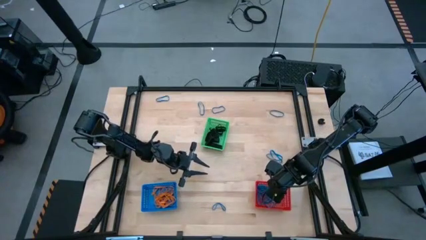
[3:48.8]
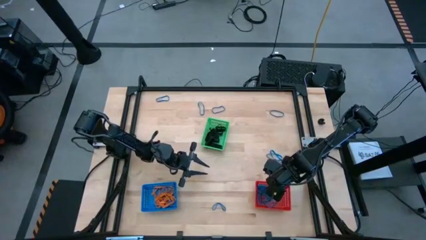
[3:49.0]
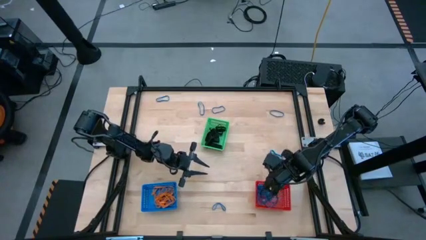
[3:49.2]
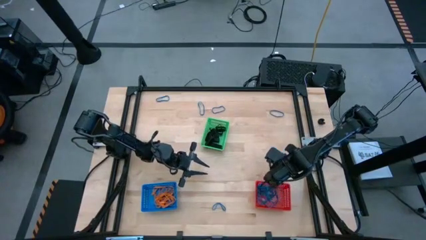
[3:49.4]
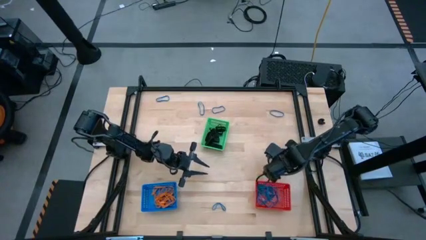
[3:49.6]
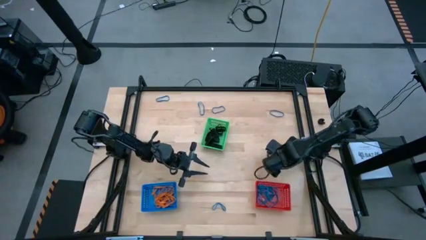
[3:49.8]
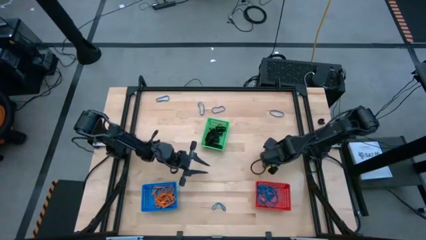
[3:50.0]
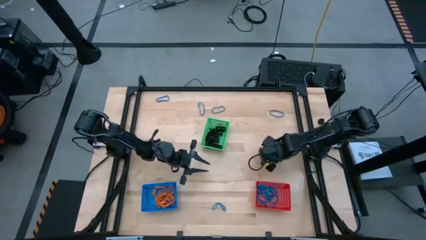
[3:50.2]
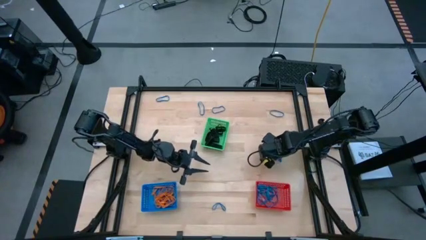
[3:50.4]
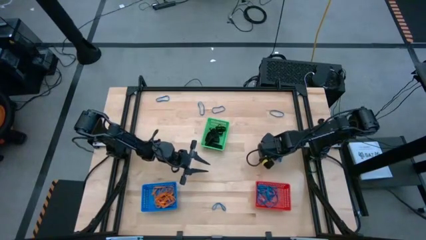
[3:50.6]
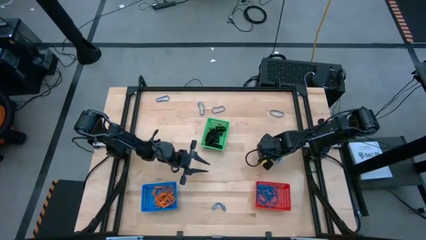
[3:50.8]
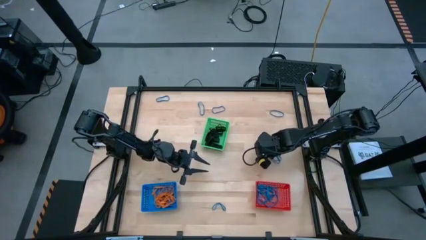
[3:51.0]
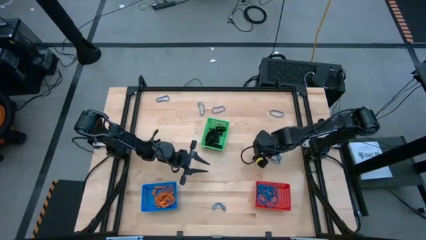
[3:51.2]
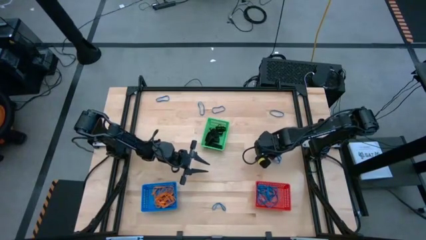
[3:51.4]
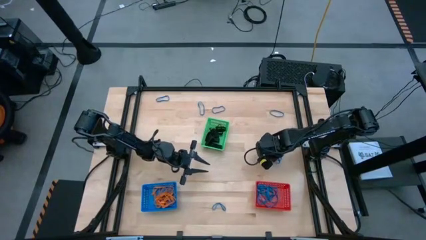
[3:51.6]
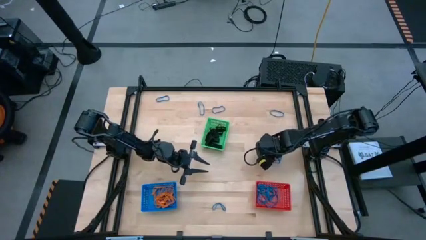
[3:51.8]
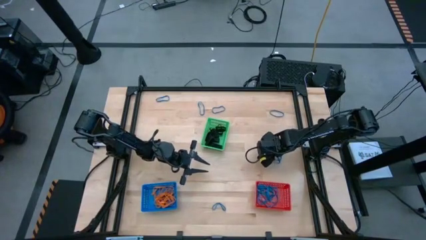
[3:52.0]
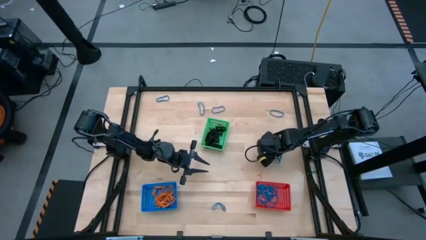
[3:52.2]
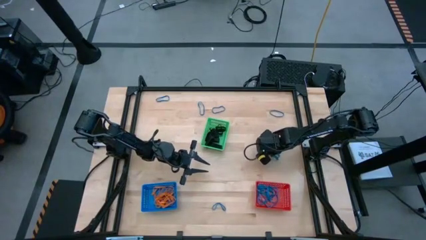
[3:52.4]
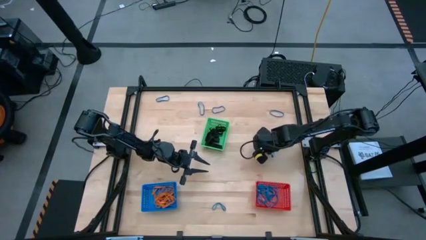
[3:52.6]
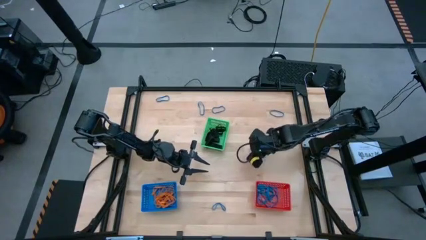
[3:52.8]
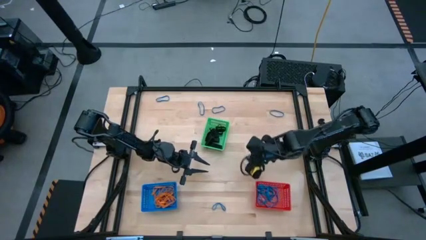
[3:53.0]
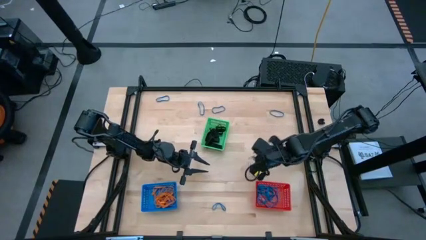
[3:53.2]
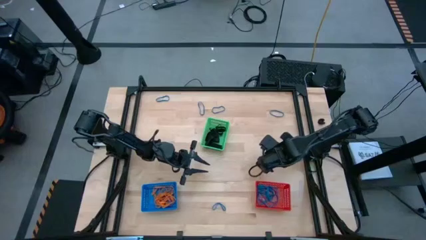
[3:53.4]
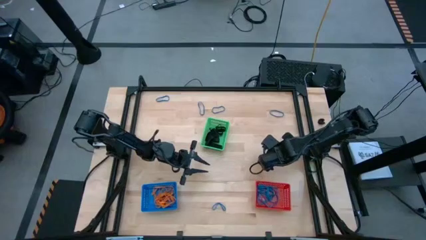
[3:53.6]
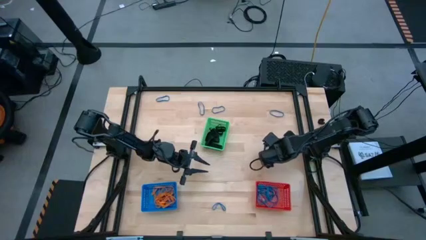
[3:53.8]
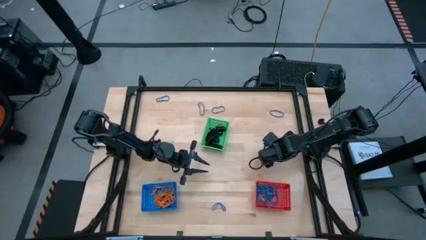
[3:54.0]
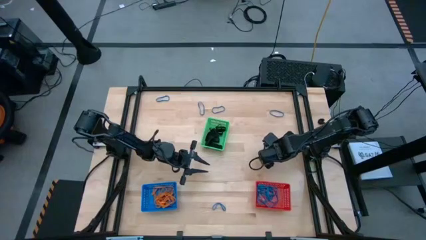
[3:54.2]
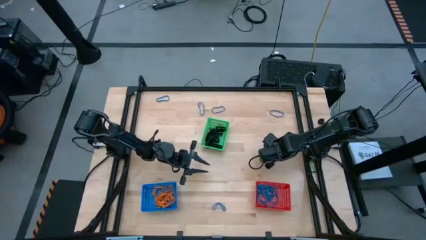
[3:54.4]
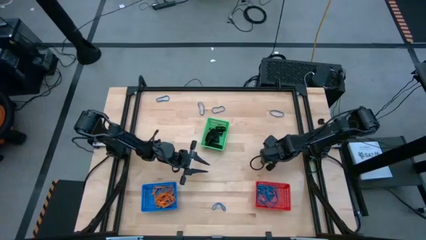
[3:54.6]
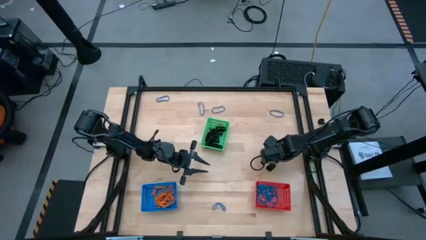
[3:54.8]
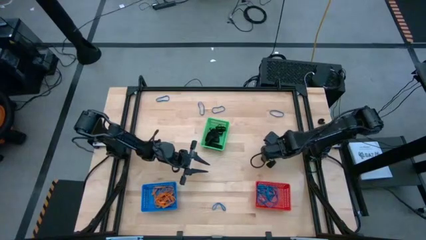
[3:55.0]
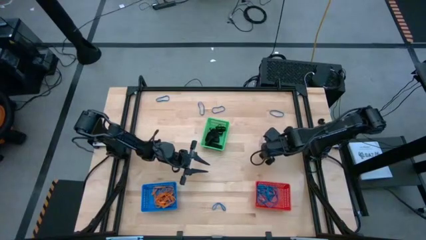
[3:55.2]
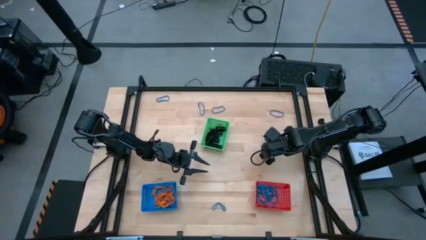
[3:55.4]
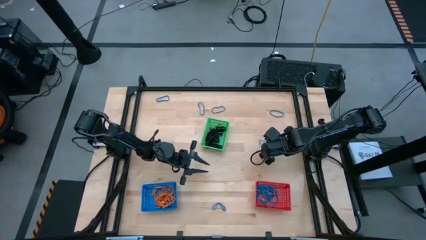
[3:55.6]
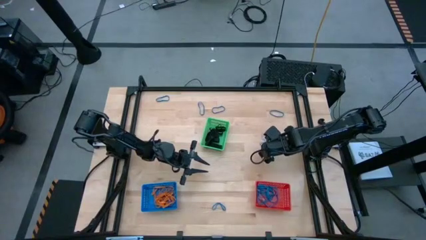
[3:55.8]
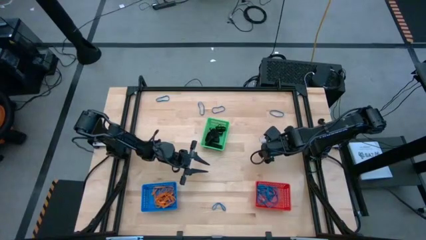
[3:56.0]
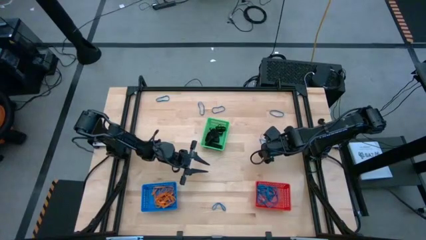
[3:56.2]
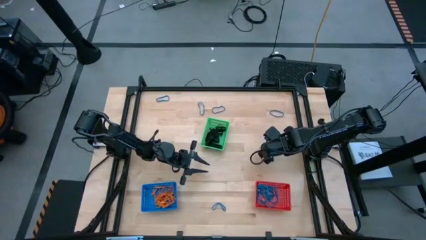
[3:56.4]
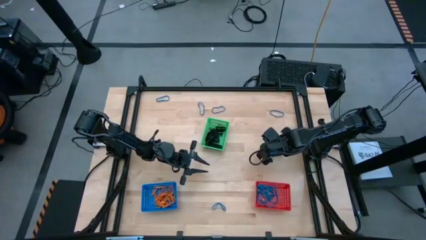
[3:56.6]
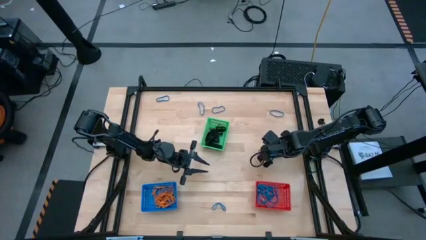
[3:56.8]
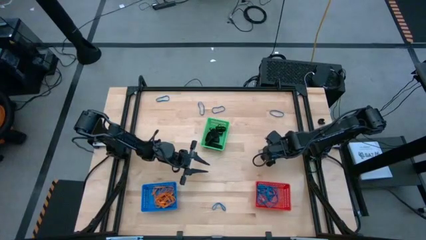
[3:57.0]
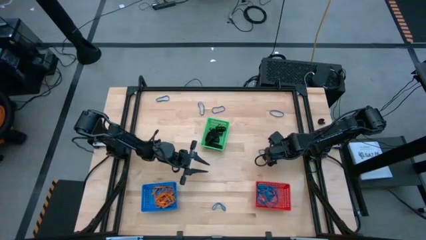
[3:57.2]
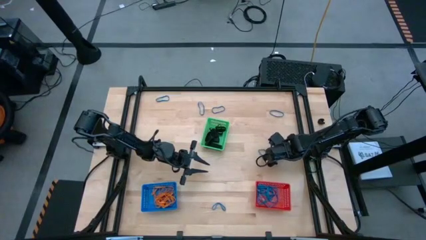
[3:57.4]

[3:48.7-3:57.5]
Task: Sort rubber bands into baskets
Put the blue rubber band into the red bin

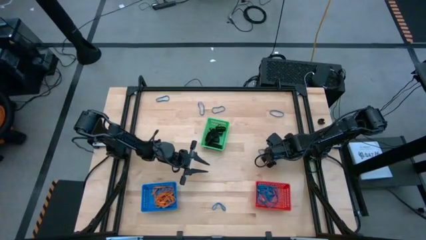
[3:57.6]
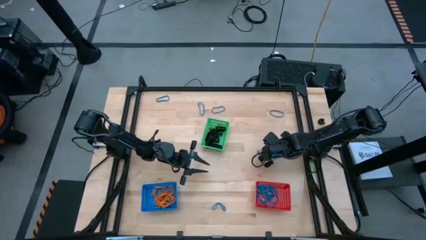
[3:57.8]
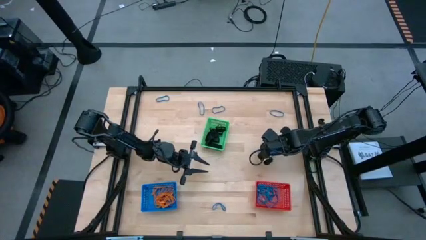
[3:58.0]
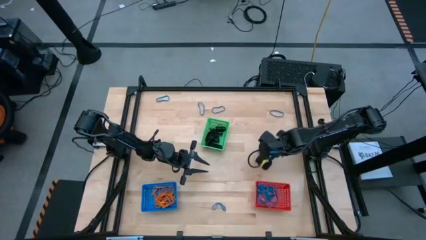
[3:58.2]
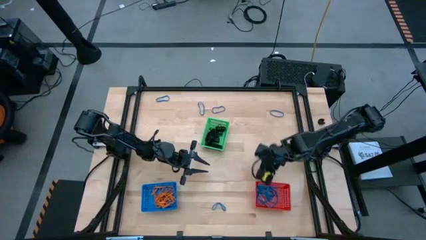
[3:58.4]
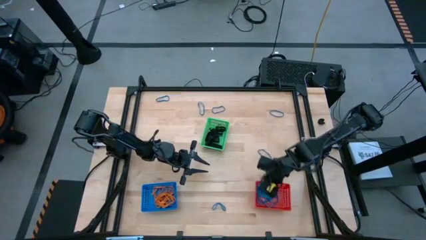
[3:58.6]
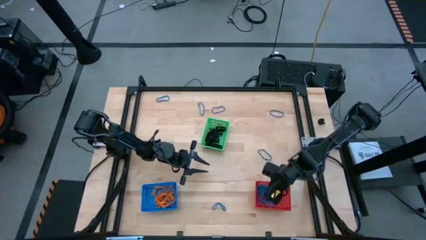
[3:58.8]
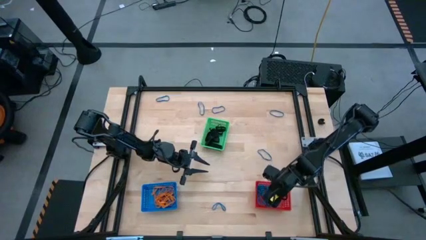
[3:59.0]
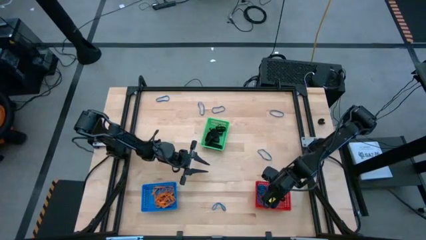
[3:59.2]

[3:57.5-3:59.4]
Put the blue rubber band into the red bin

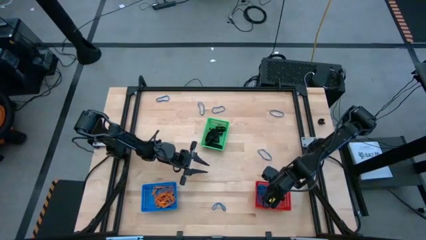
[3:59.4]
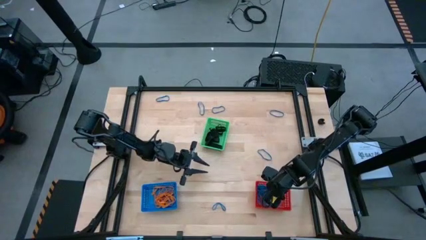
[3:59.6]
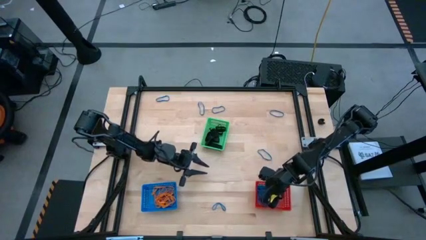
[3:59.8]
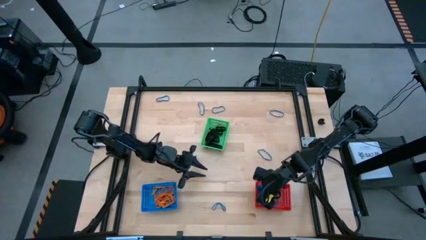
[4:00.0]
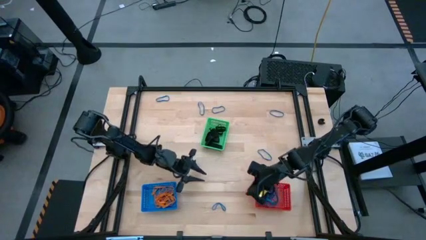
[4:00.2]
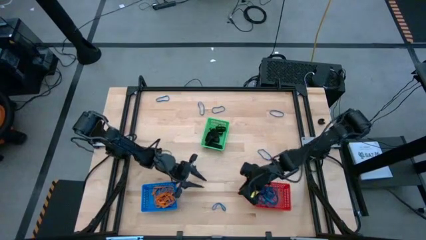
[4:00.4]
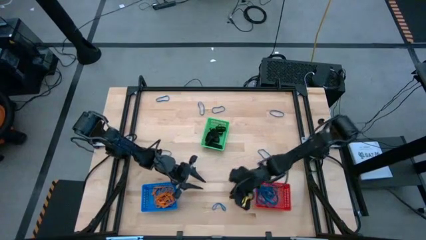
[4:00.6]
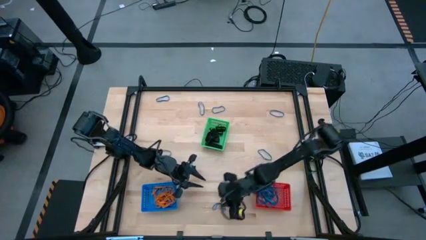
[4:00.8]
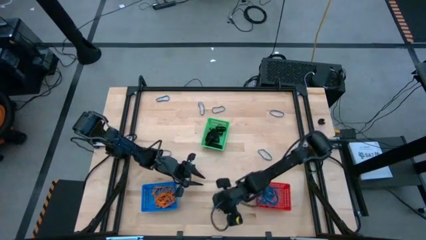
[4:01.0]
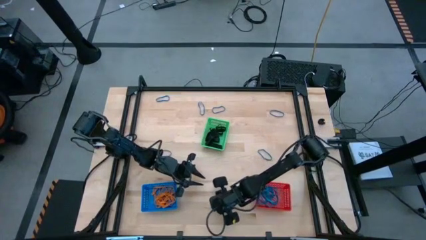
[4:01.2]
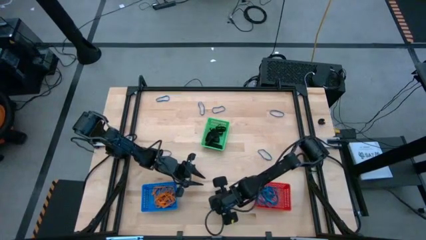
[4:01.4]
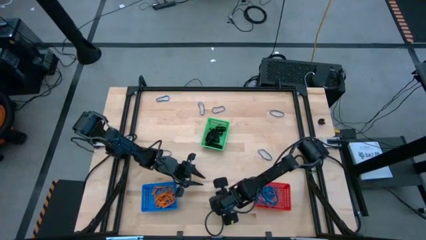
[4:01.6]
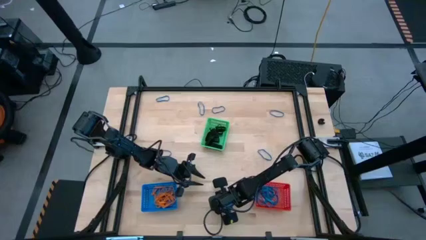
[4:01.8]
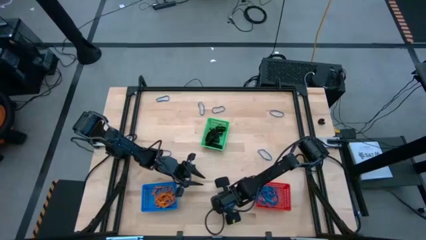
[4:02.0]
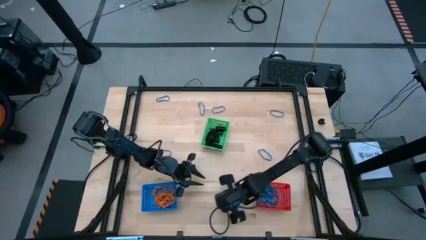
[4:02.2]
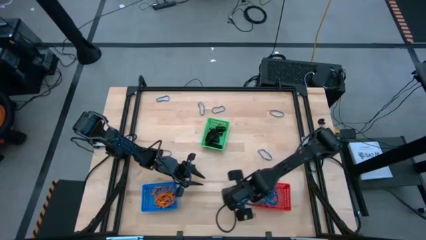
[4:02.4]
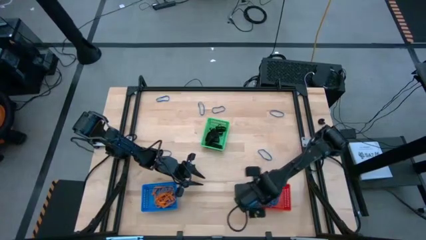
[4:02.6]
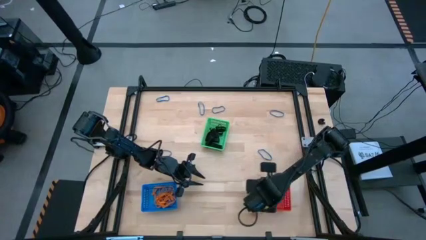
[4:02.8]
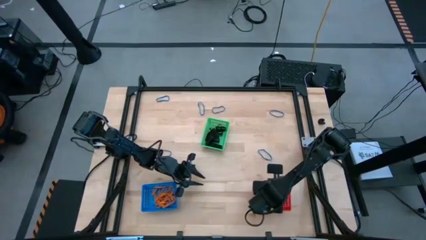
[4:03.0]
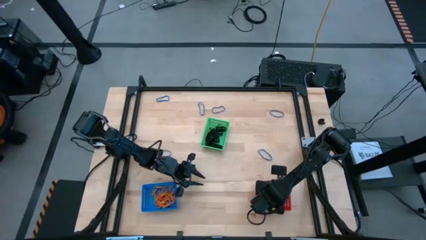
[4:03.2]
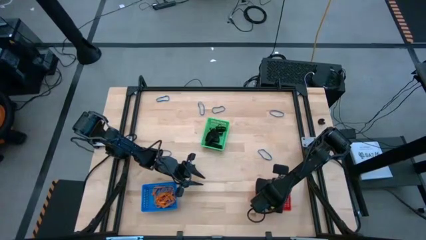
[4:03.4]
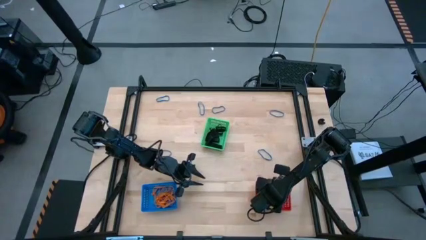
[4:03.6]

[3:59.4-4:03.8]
Put the blue rubber band into the red bin

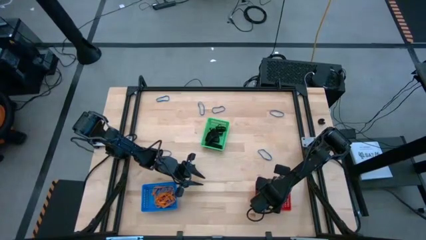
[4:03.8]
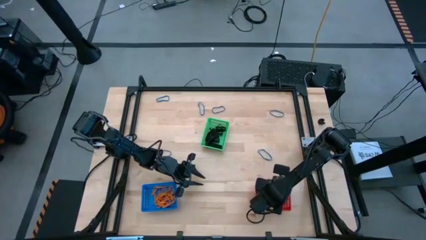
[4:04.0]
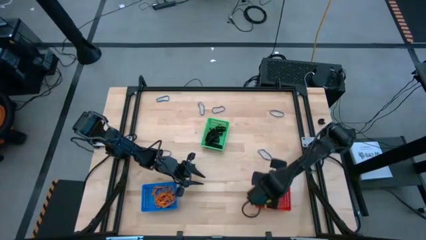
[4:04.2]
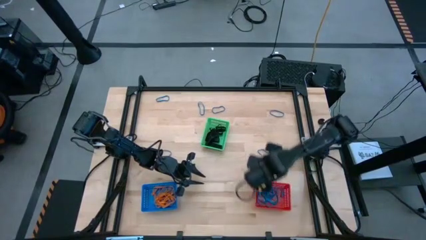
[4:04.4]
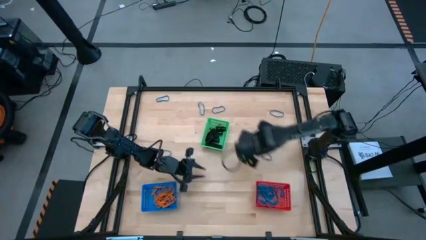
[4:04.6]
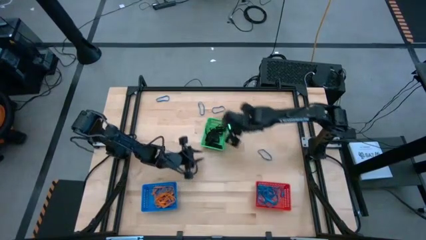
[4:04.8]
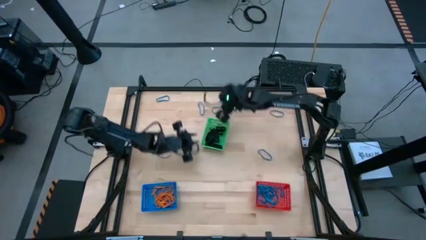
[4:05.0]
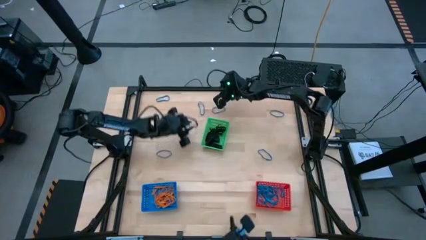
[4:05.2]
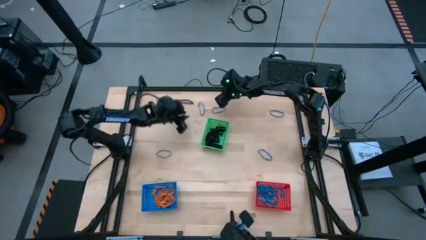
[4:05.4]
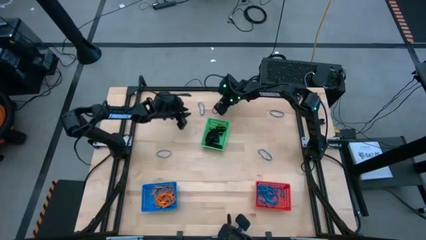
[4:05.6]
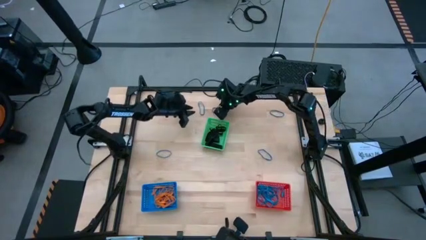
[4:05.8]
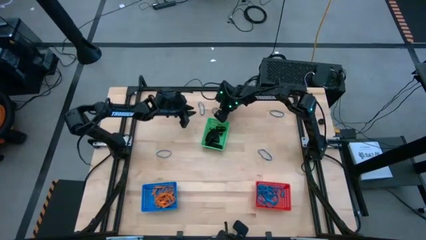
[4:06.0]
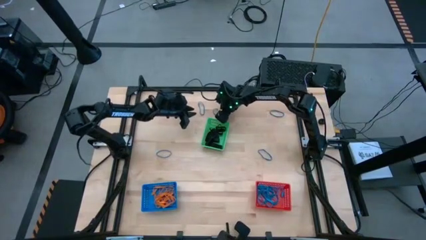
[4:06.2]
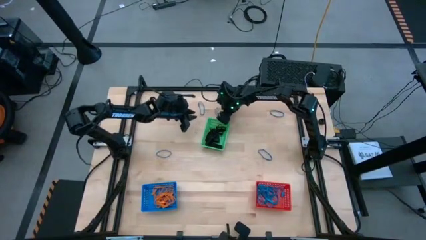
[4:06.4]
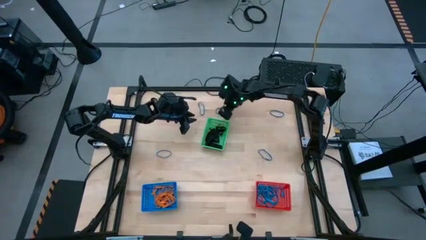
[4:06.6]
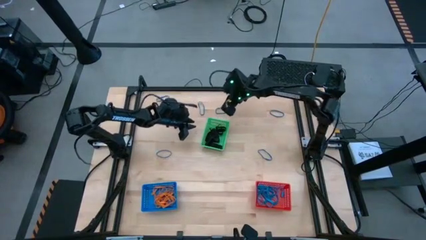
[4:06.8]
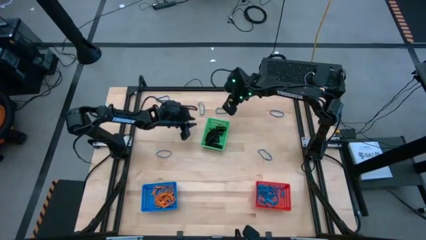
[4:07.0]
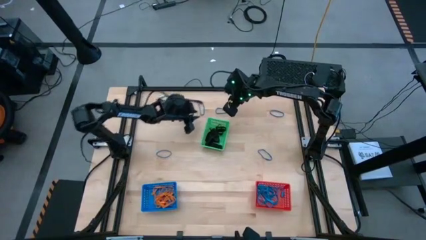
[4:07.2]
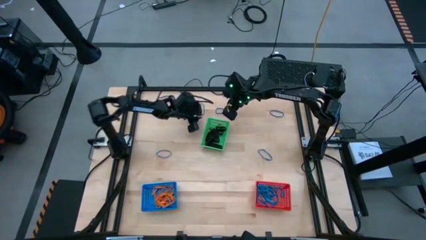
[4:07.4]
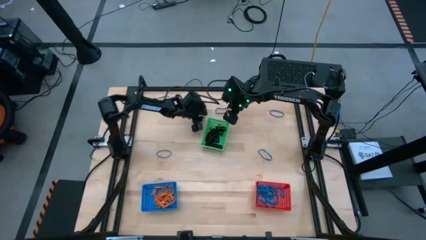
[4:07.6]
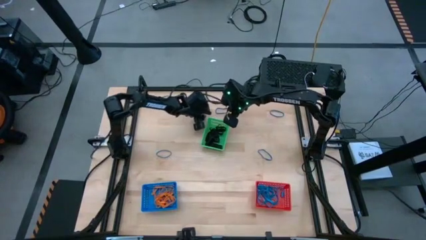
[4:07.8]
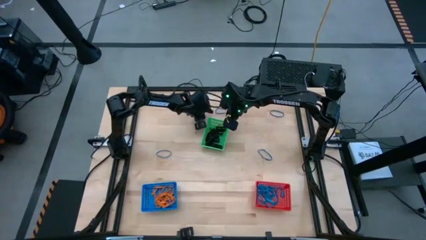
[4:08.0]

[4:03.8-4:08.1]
Put the blue rubber band into the red bin
